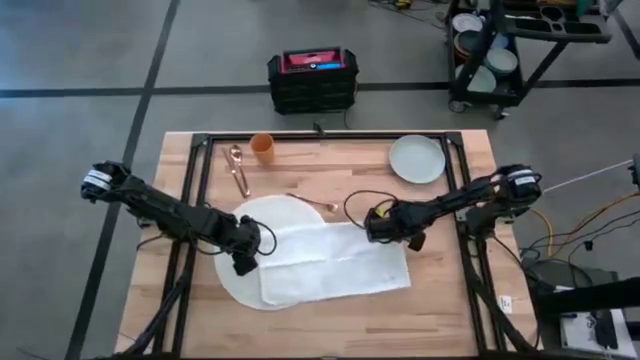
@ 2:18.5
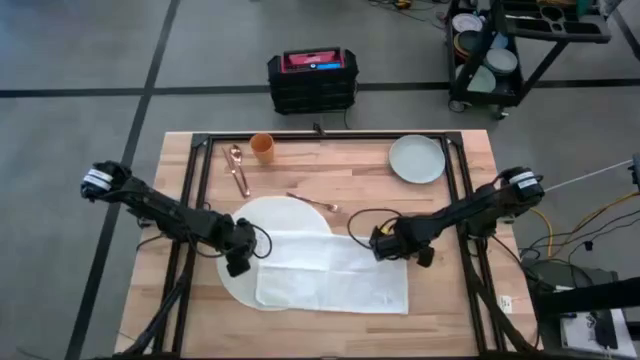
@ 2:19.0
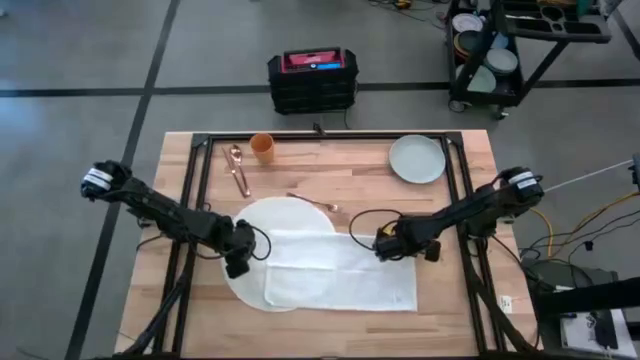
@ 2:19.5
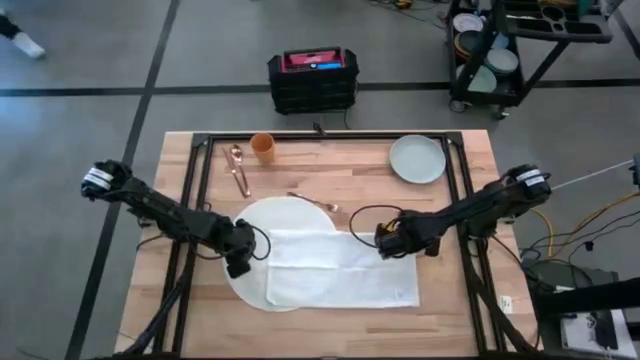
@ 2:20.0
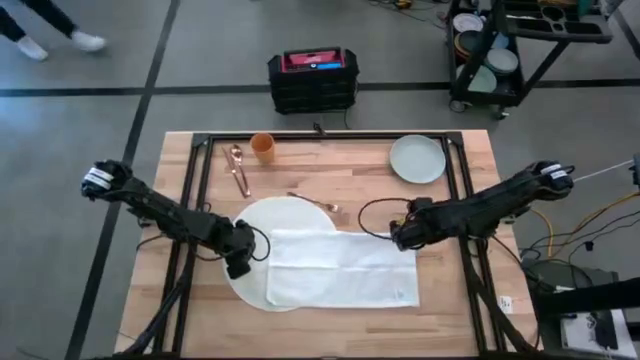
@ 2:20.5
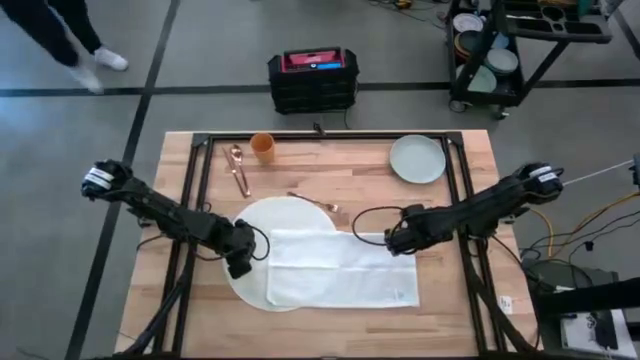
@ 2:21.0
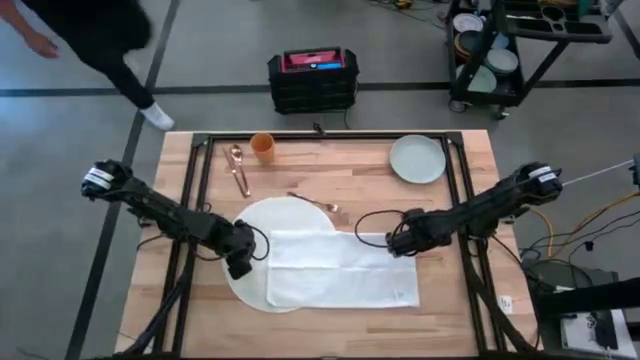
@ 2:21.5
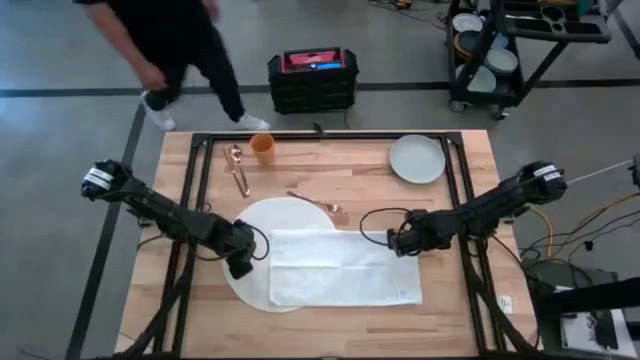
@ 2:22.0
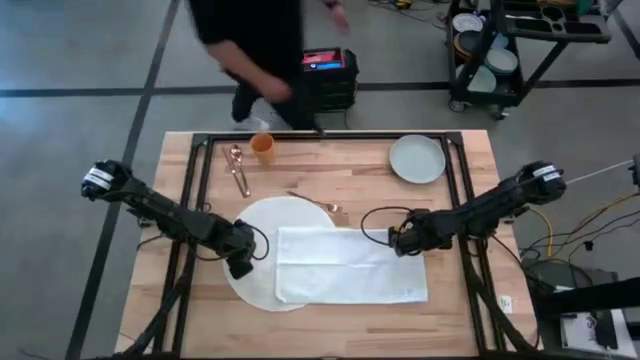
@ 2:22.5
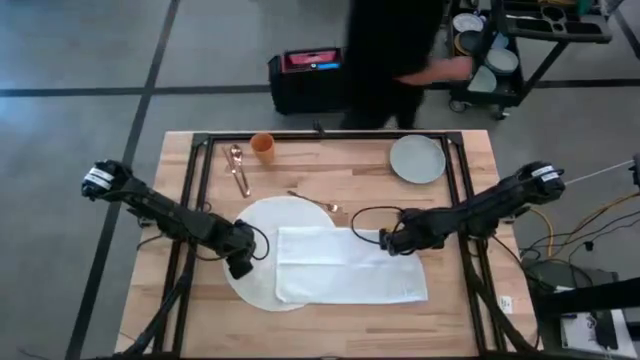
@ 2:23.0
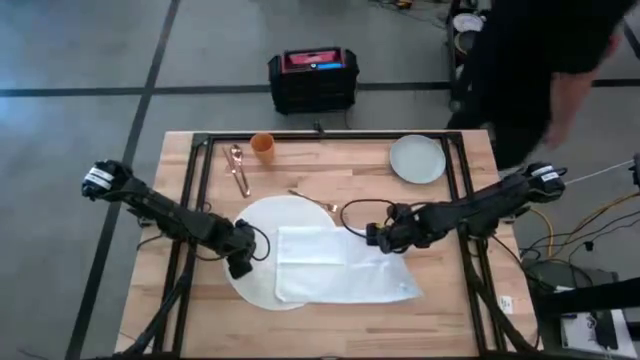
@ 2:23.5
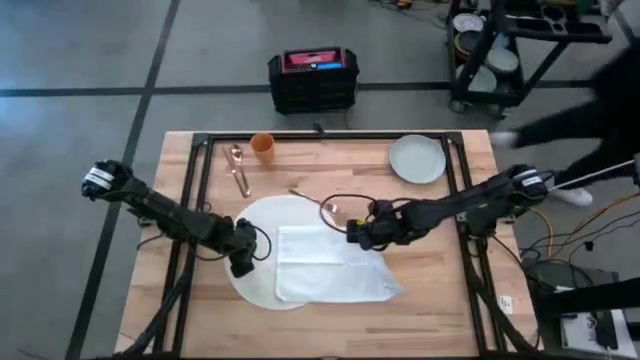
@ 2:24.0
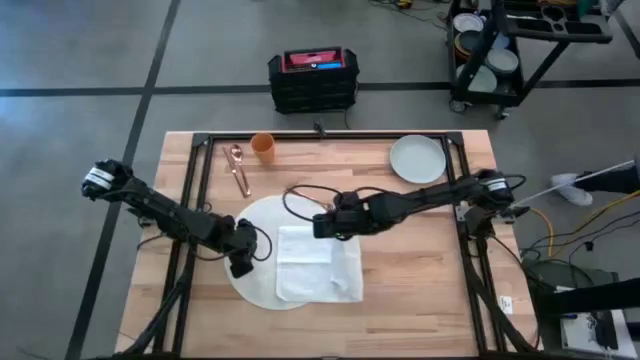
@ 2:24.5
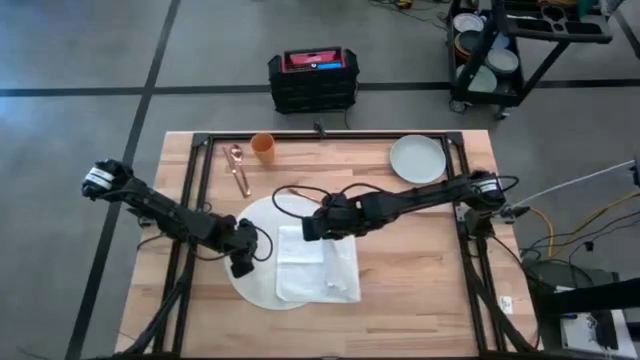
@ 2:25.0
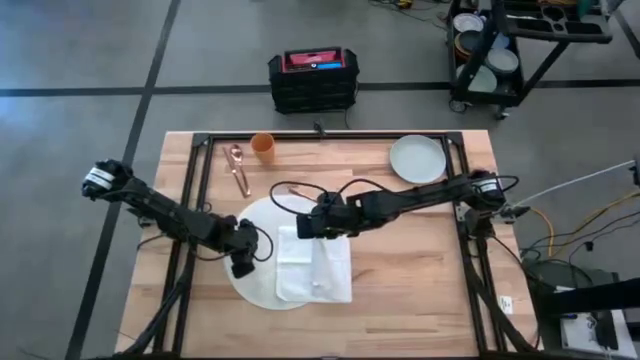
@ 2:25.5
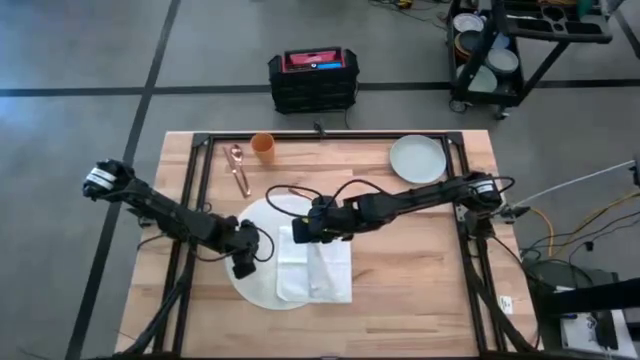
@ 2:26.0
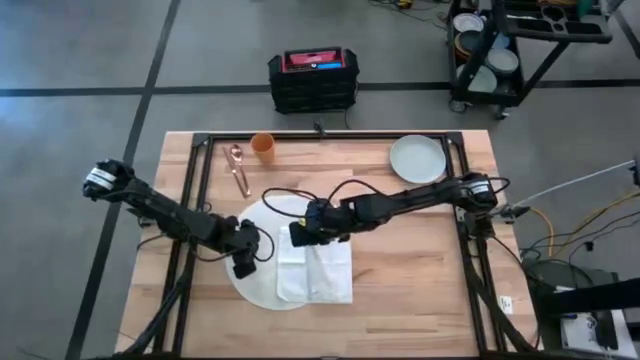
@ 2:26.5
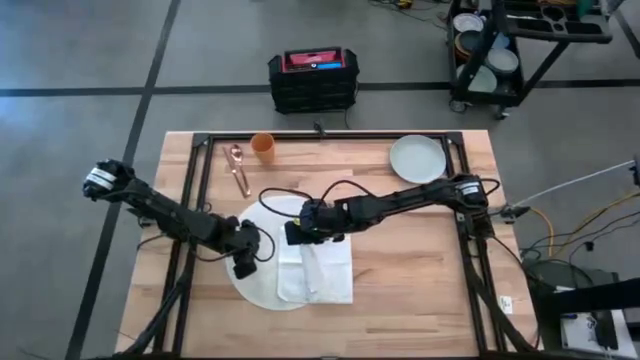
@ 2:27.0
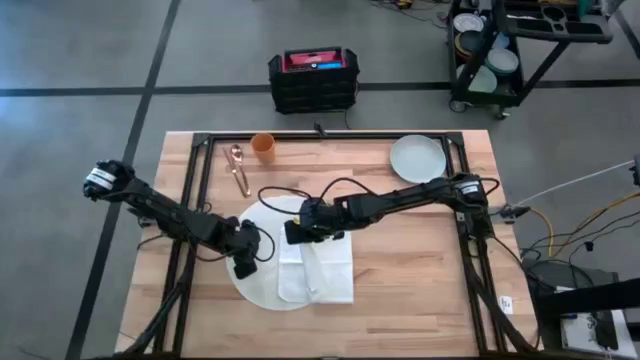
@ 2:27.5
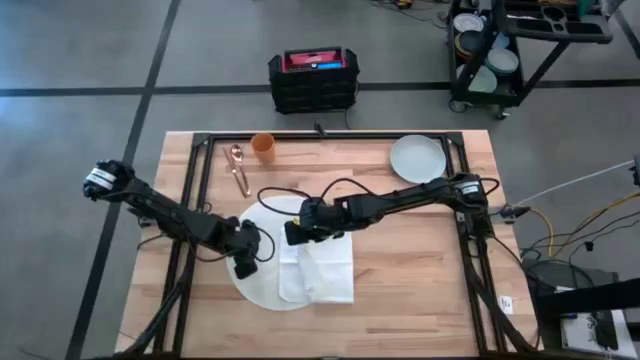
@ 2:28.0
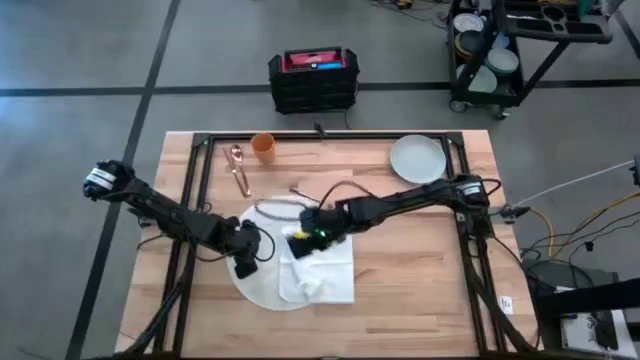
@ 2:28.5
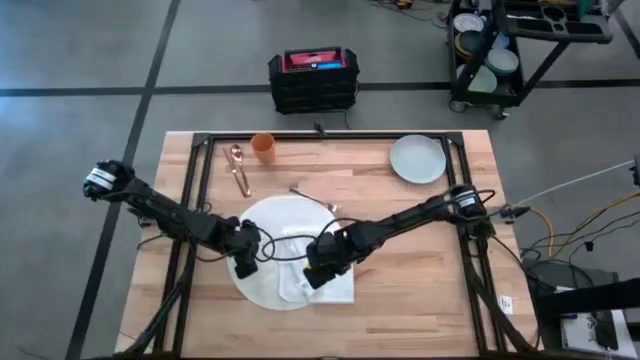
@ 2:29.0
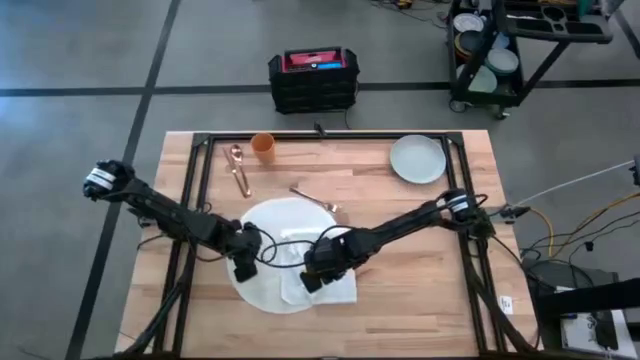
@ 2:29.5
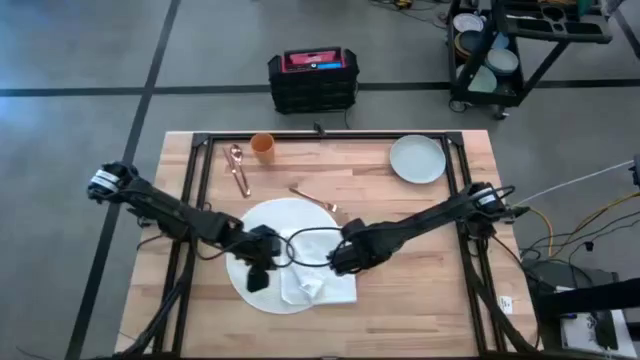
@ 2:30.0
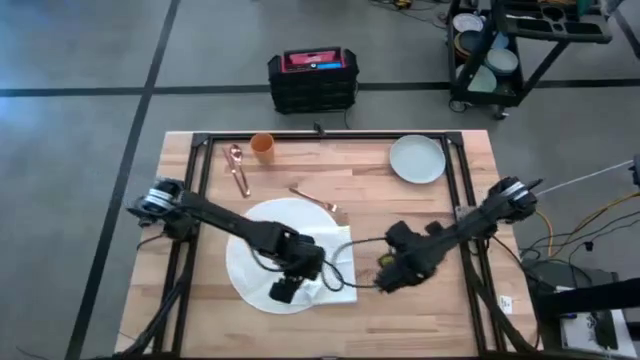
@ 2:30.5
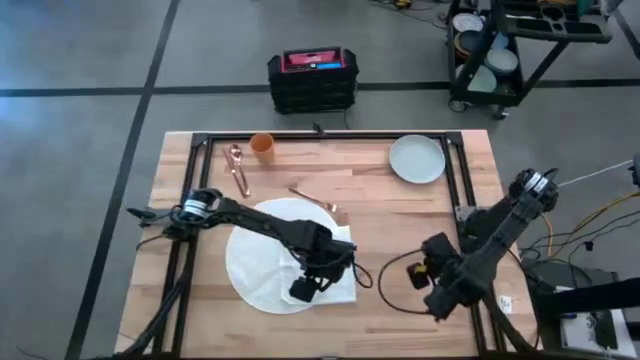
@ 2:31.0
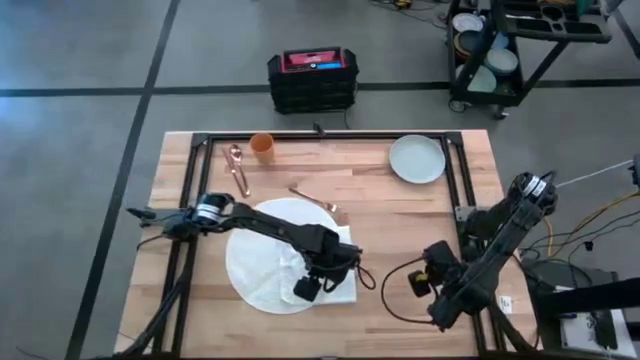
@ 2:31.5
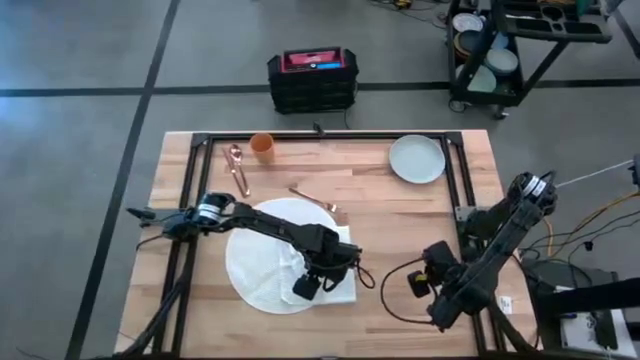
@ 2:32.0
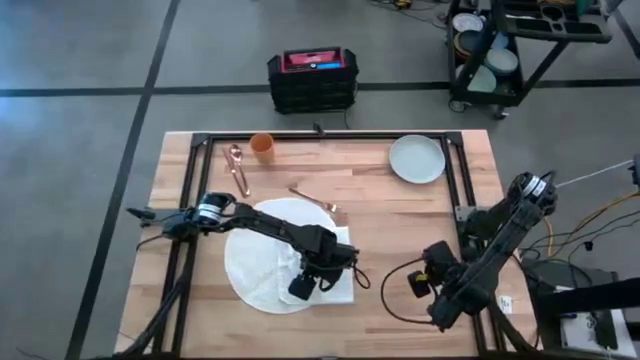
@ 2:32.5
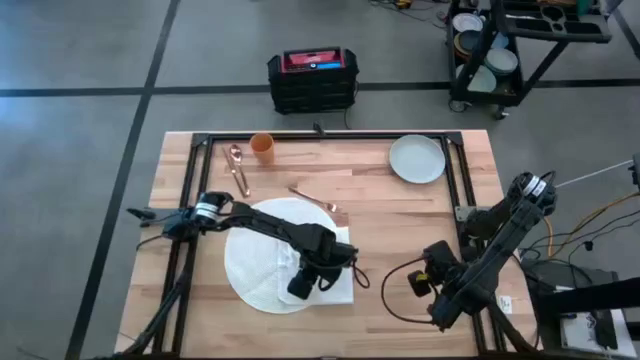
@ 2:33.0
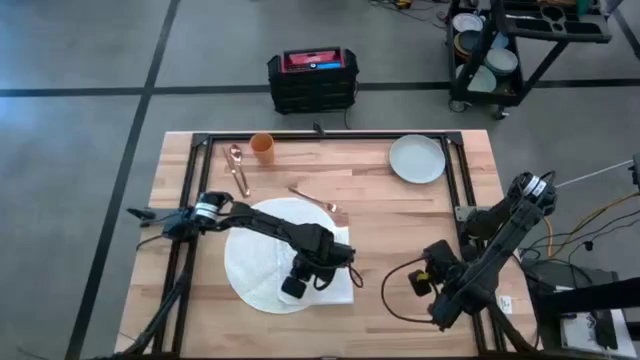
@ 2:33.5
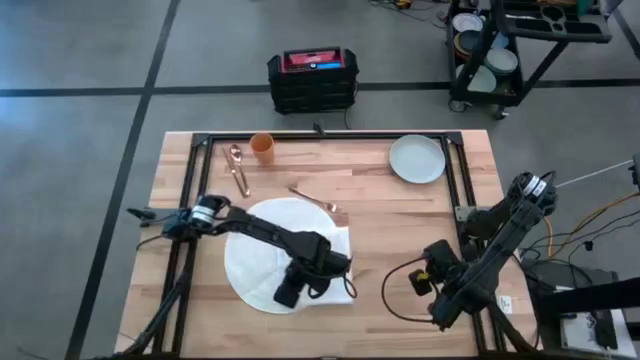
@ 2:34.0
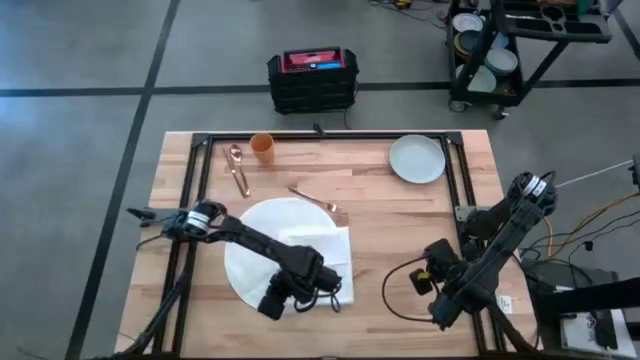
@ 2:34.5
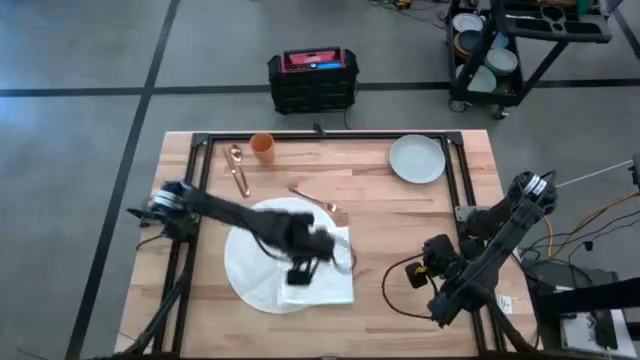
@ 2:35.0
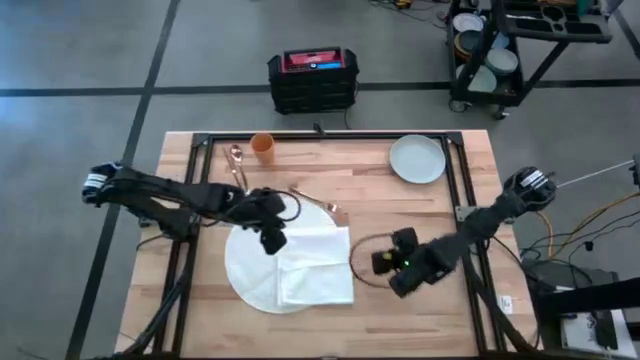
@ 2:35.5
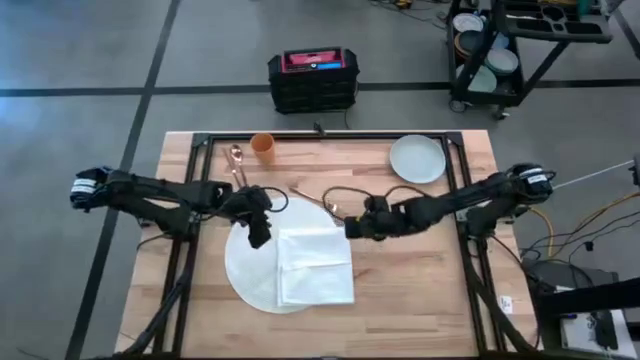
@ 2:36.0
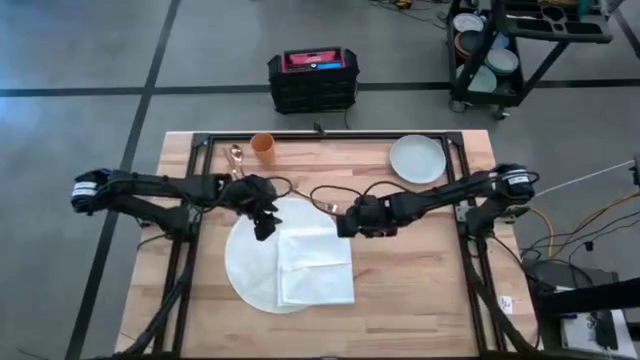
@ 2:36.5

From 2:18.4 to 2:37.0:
Task: Set table place
Fold the white napkin

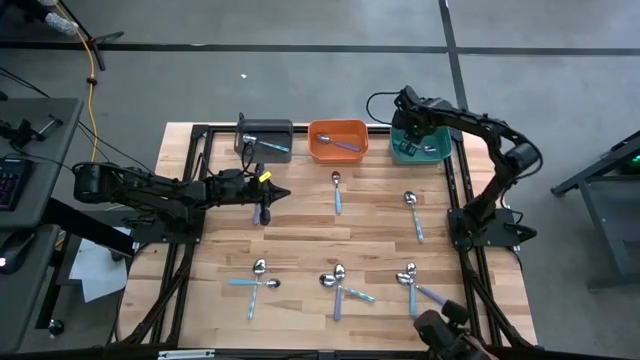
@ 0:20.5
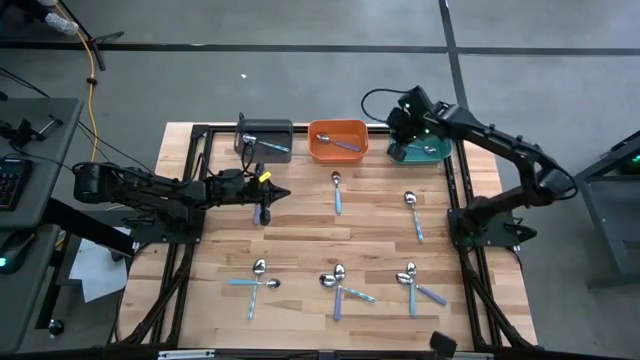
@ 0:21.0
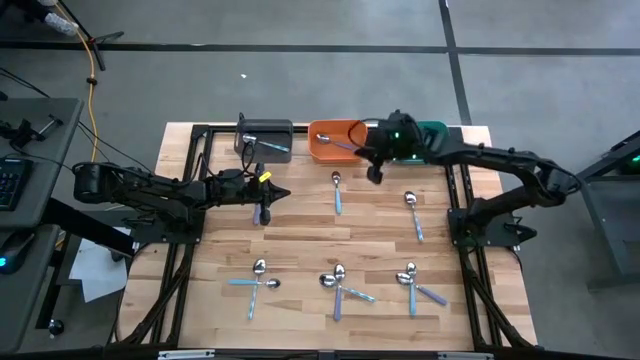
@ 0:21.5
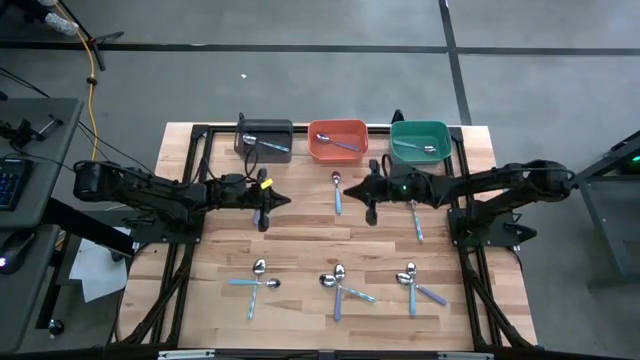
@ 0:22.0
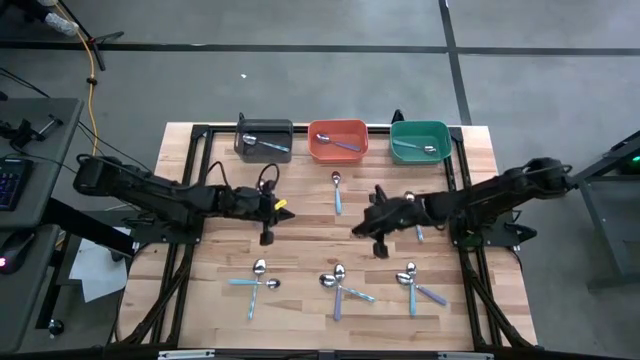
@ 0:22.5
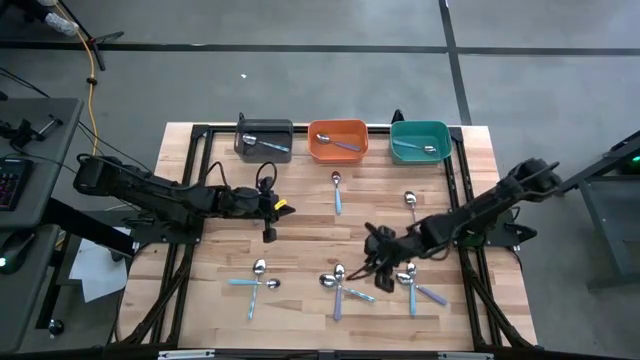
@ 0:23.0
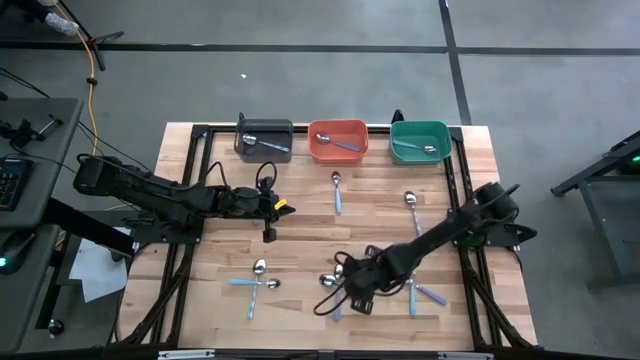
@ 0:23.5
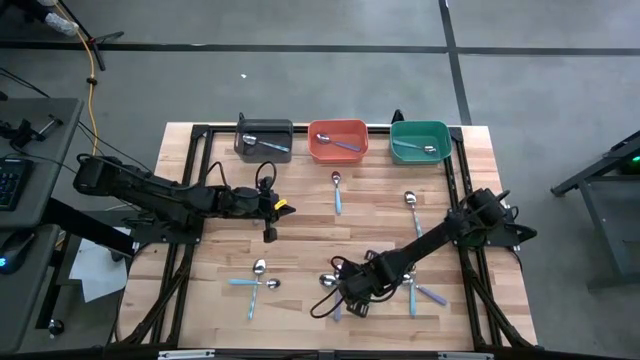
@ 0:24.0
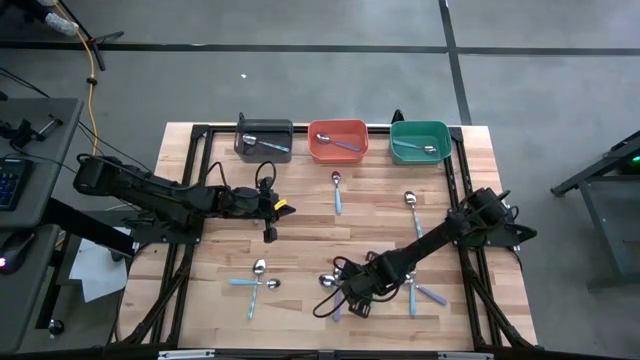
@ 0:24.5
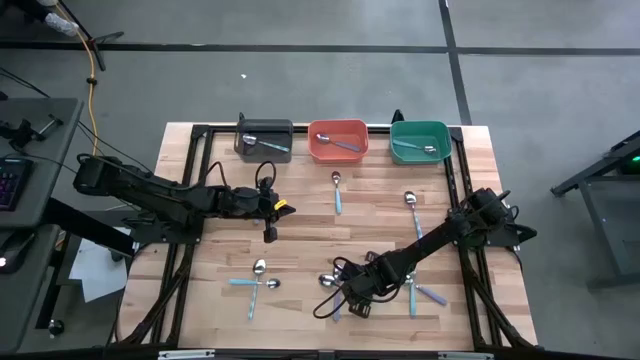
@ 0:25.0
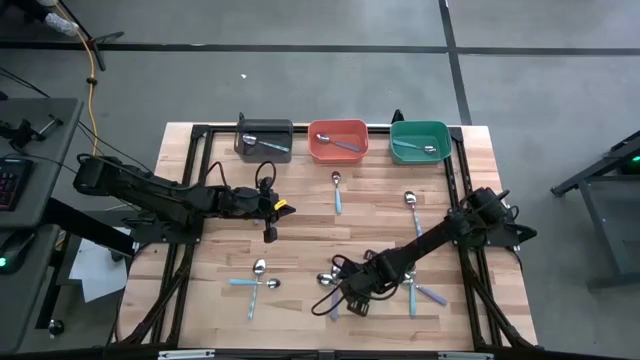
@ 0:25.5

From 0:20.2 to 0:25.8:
Task: Sort silverware by color (type)
Put the blue patterned spoon into the black bin
